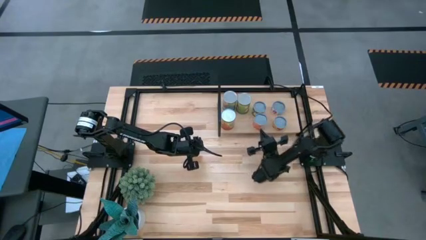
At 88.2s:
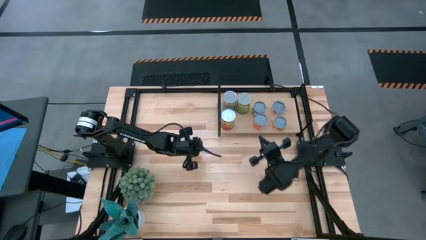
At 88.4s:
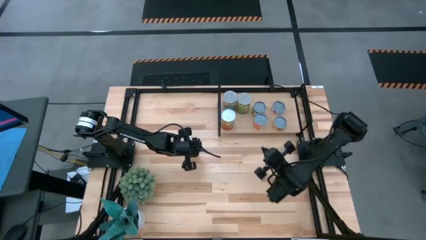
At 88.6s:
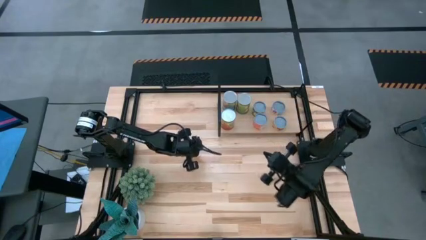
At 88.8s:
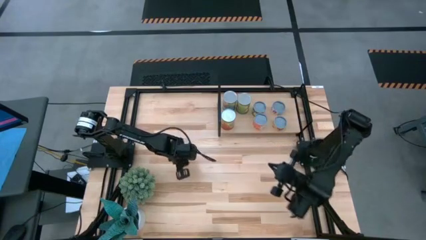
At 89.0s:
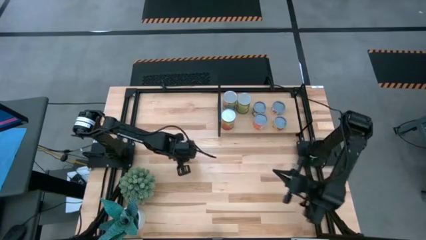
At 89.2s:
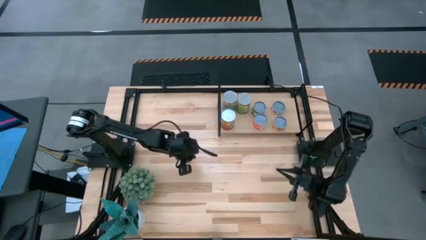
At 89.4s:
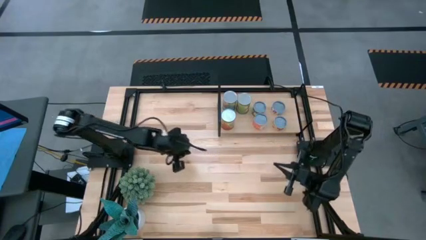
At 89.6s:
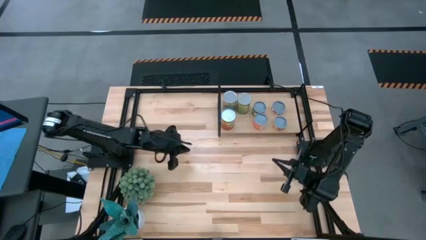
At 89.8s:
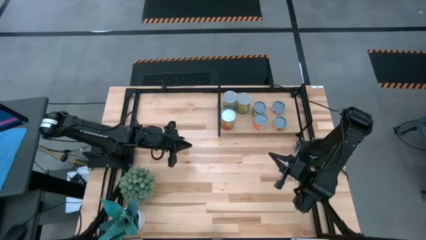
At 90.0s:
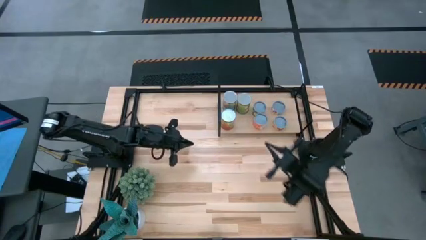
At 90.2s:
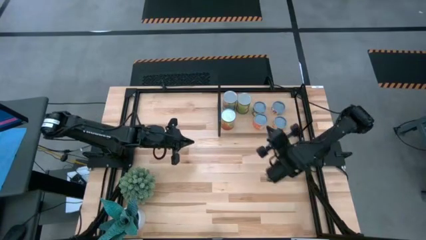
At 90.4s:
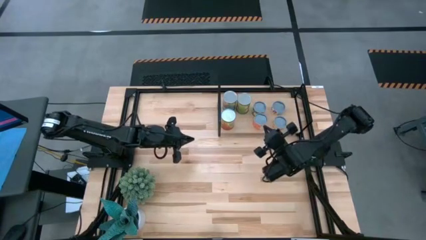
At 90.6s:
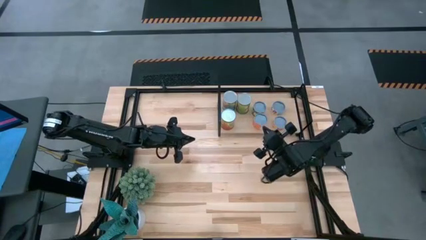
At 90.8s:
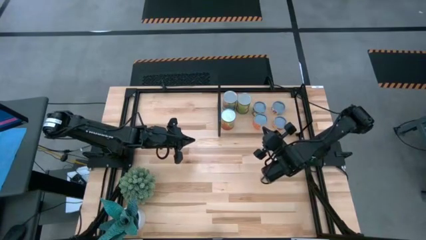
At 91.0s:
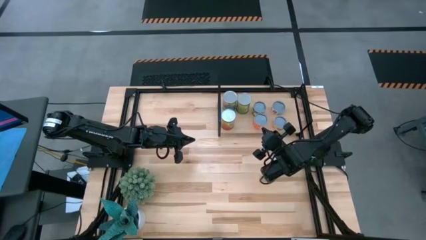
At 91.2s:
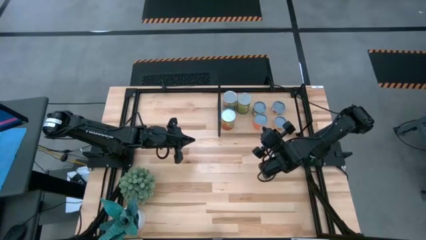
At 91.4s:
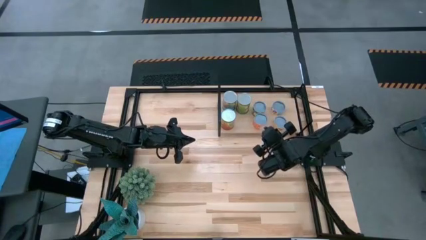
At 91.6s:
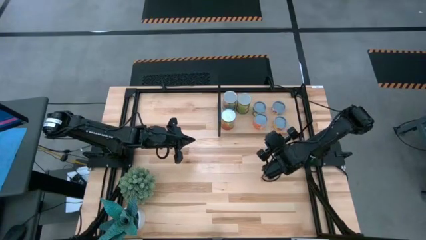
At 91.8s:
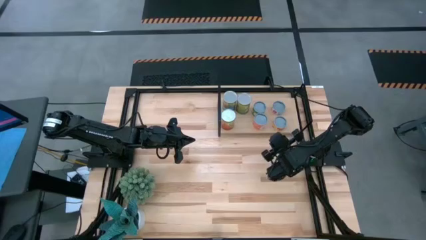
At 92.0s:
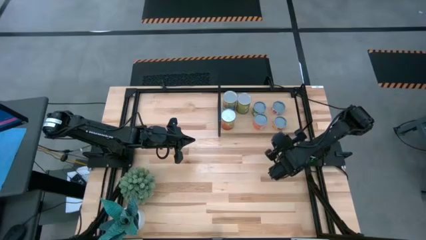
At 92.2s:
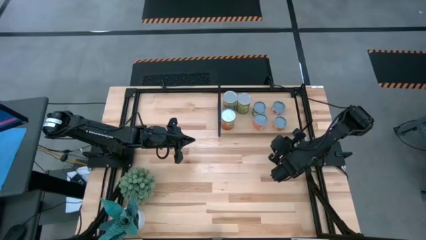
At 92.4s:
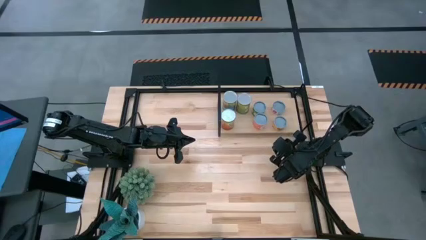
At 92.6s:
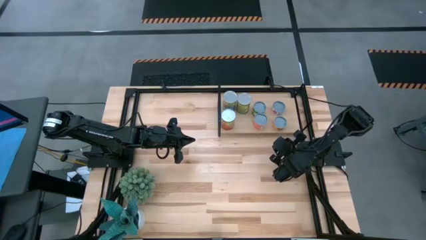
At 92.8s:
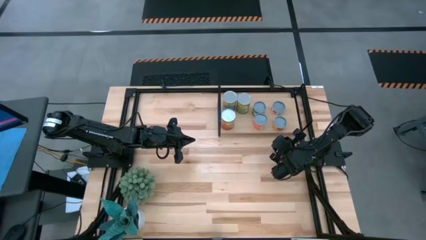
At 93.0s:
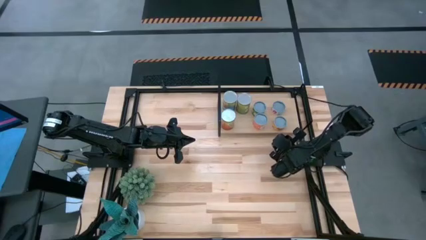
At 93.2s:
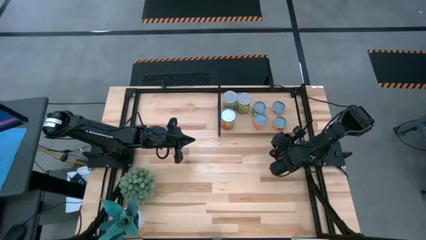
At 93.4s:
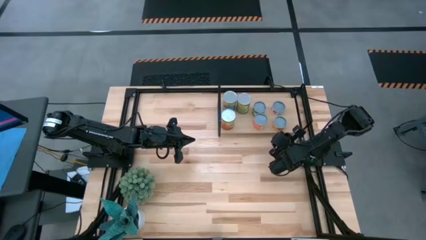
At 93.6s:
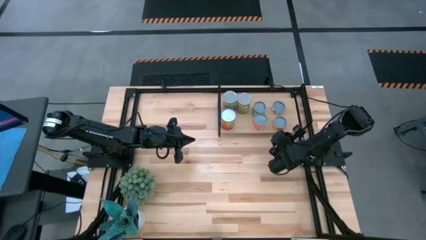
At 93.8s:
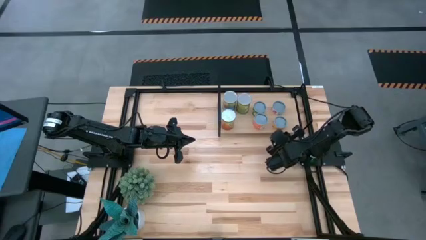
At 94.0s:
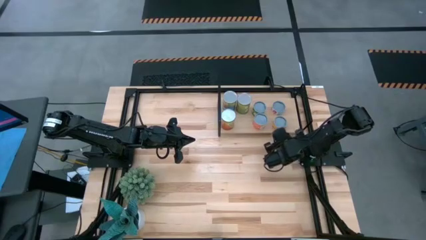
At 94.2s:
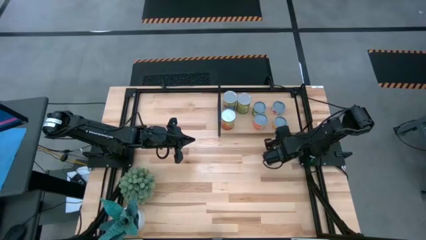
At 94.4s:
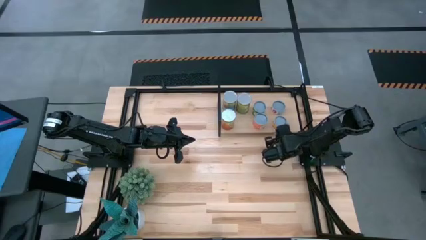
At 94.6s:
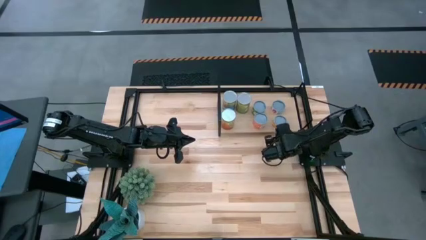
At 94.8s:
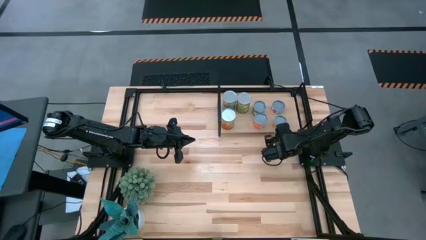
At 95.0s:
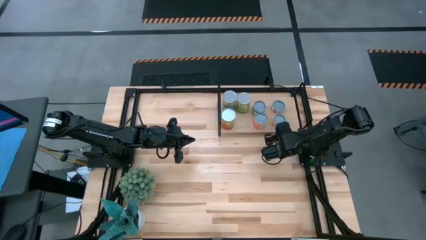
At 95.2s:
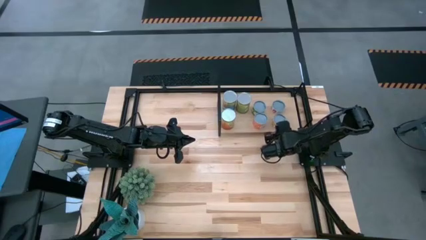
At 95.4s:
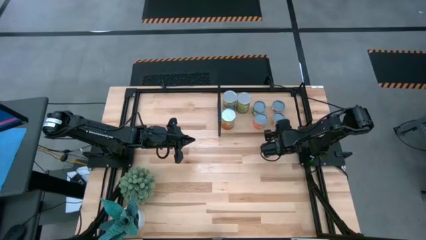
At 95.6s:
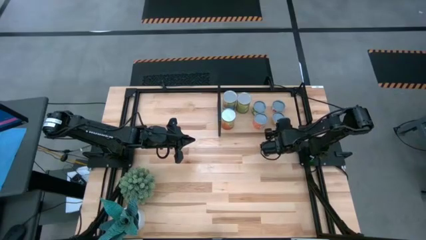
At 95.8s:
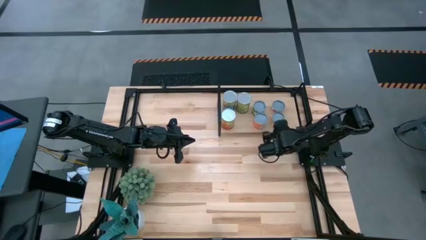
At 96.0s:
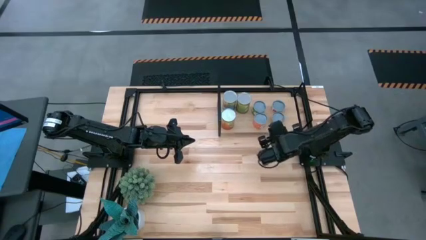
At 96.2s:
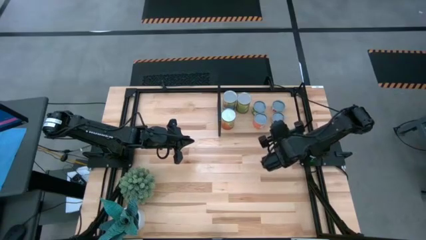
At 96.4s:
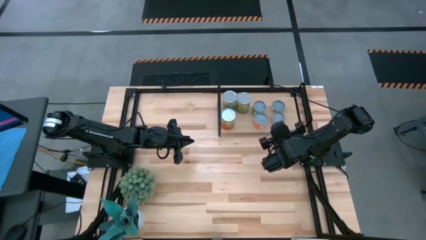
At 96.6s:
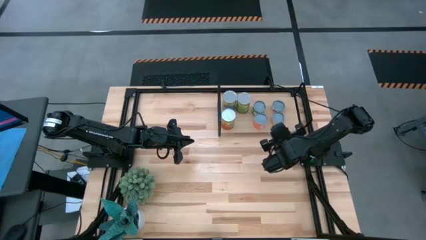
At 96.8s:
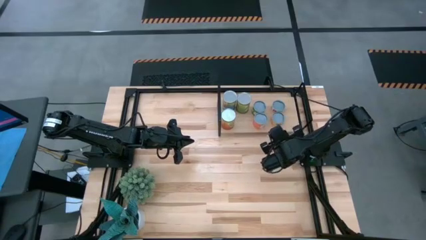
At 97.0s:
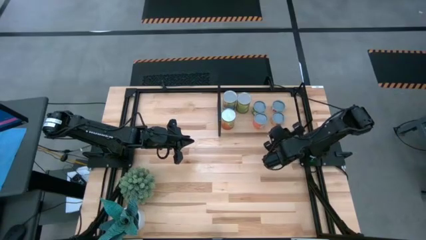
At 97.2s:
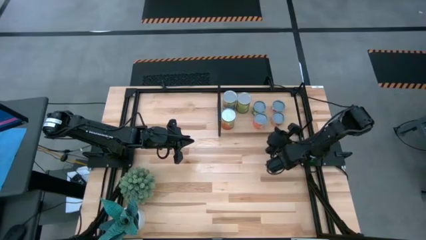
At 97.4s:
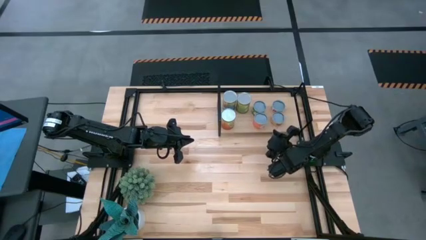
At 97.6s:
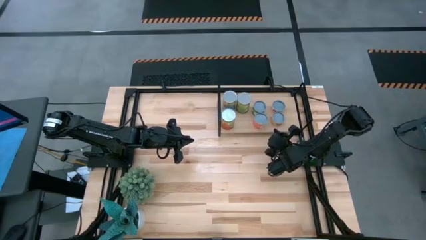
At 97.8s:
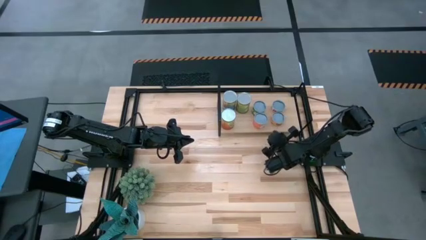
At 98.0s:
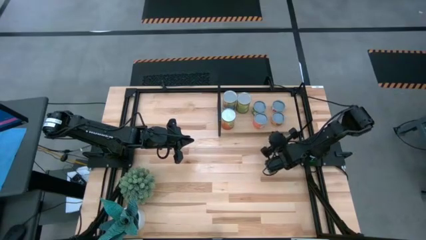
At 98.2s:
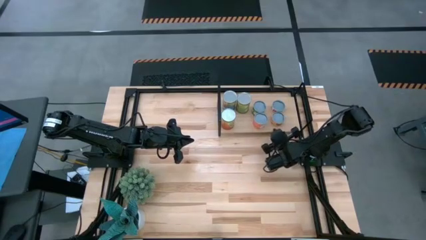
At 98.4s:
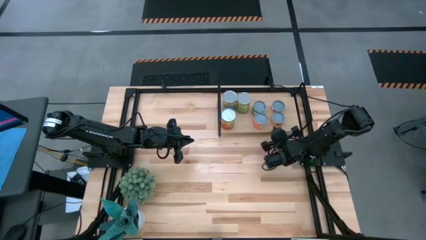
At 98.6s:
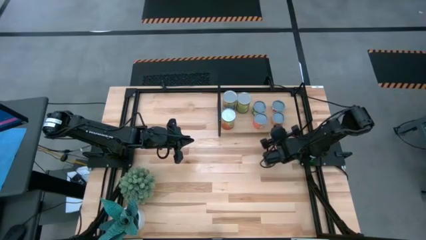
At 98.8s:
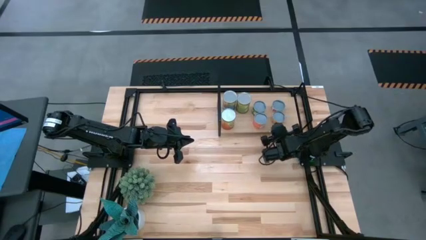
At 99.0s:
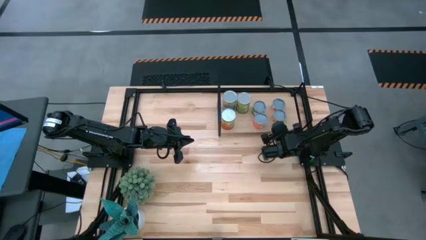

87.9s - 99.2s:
Task: Pick and place cans onto a shelf
Adjust the canned pineapple on the shelf

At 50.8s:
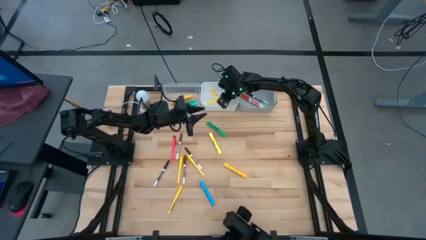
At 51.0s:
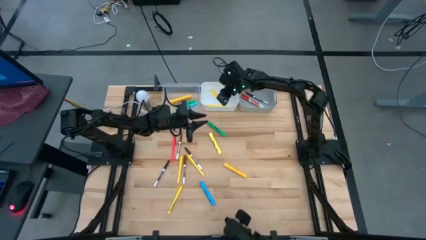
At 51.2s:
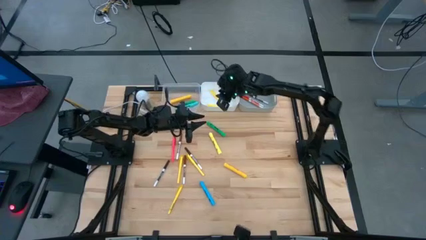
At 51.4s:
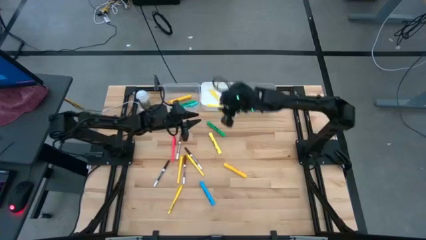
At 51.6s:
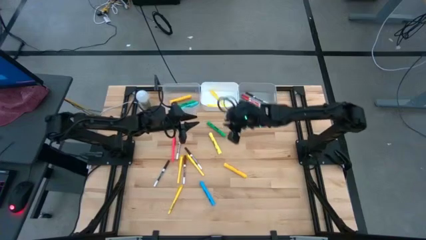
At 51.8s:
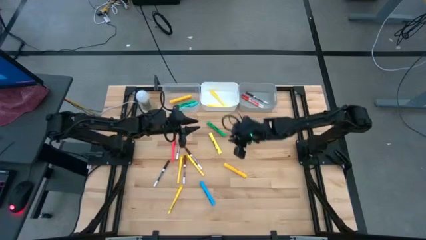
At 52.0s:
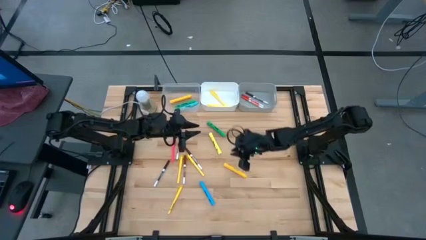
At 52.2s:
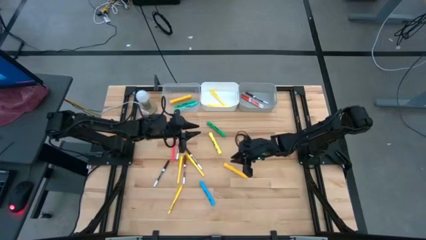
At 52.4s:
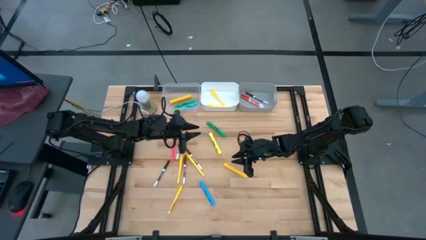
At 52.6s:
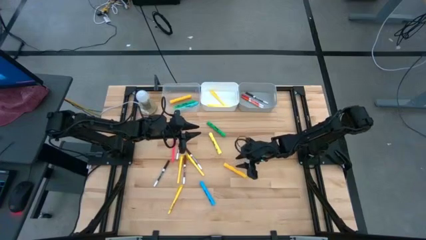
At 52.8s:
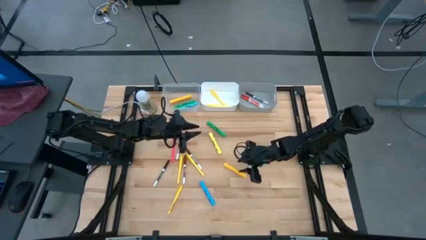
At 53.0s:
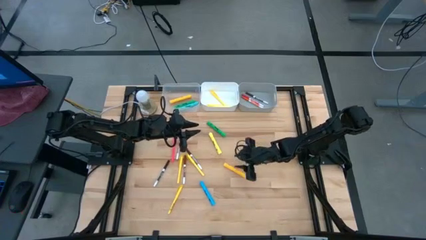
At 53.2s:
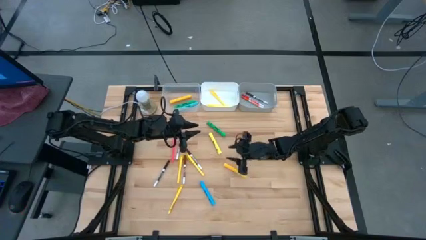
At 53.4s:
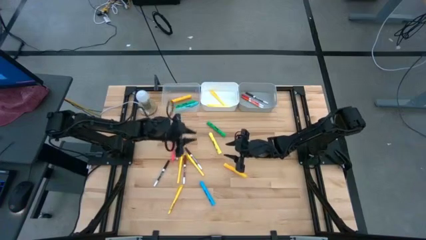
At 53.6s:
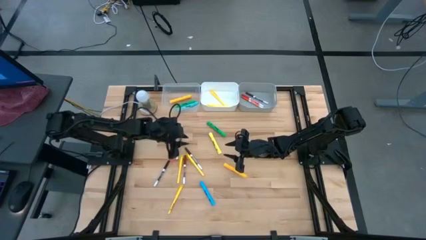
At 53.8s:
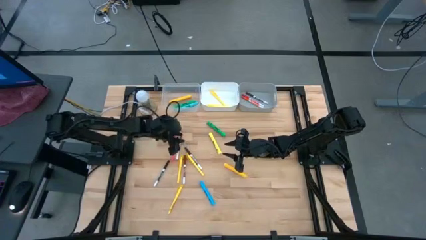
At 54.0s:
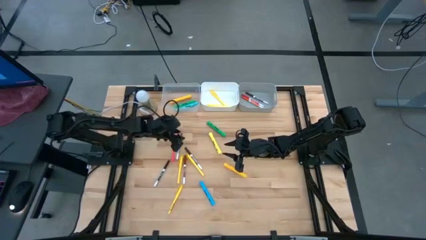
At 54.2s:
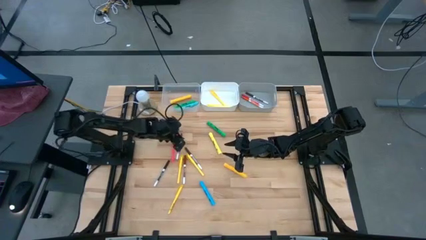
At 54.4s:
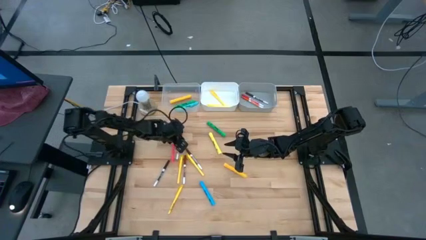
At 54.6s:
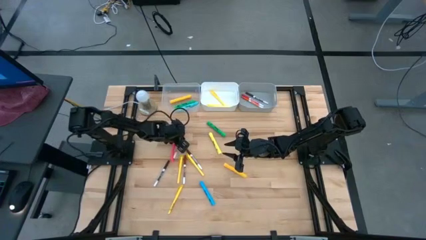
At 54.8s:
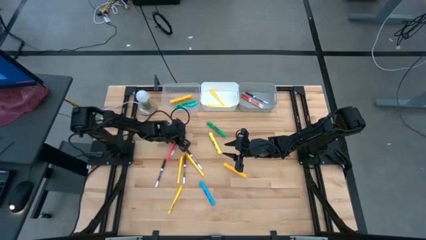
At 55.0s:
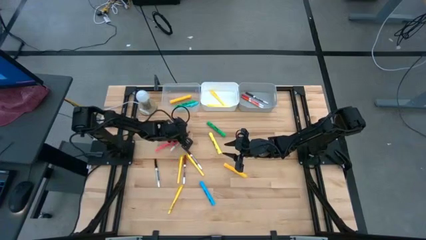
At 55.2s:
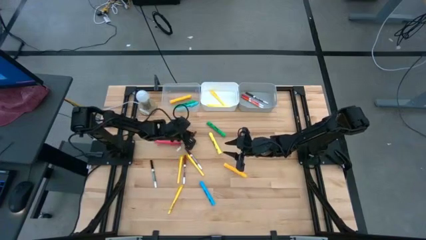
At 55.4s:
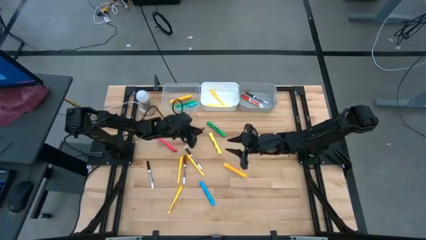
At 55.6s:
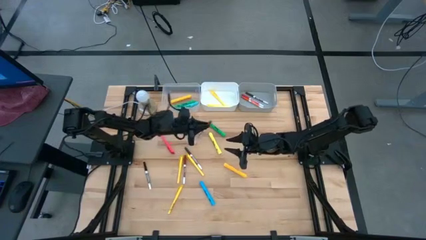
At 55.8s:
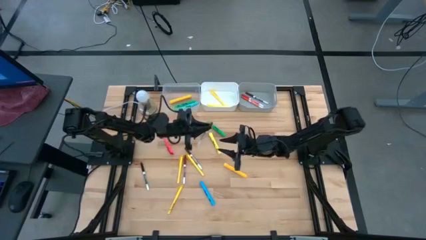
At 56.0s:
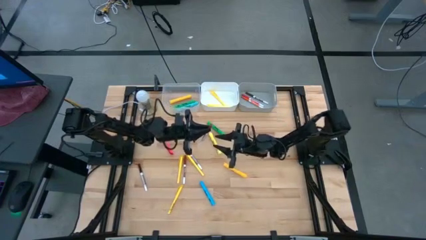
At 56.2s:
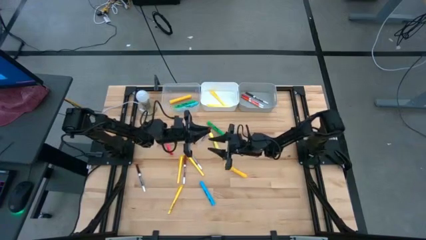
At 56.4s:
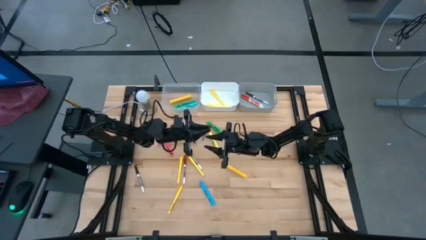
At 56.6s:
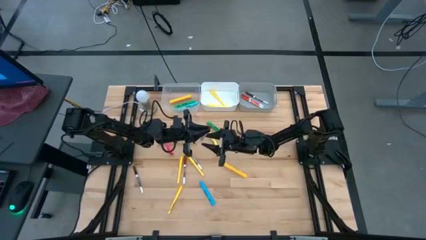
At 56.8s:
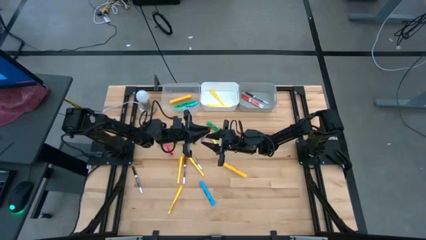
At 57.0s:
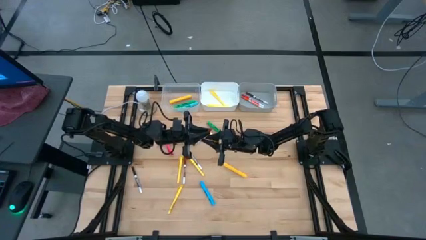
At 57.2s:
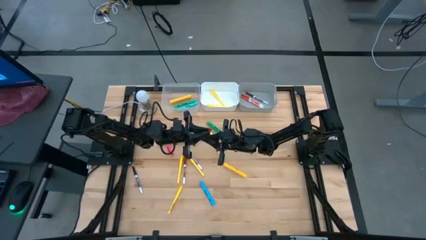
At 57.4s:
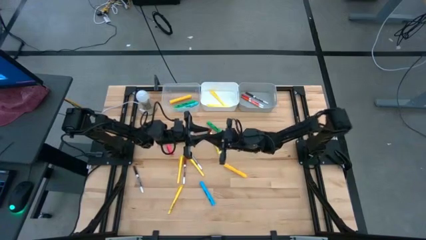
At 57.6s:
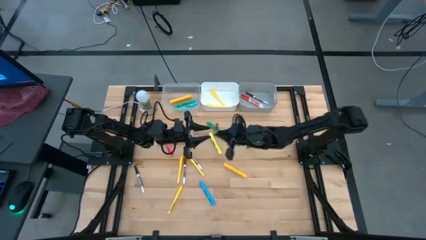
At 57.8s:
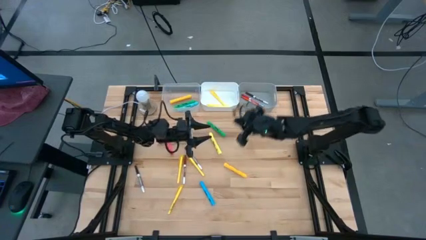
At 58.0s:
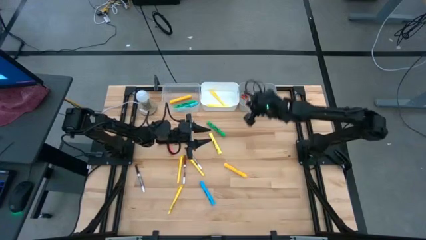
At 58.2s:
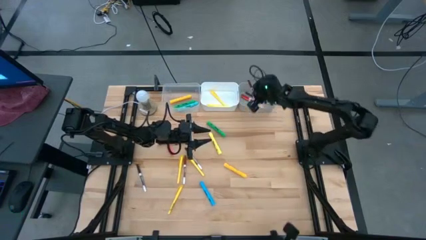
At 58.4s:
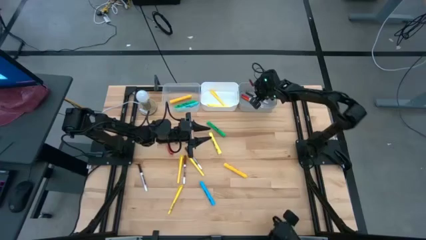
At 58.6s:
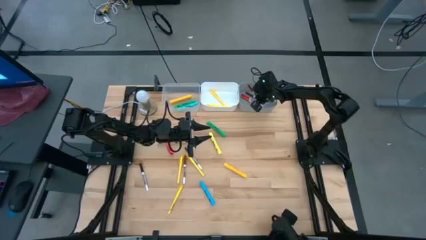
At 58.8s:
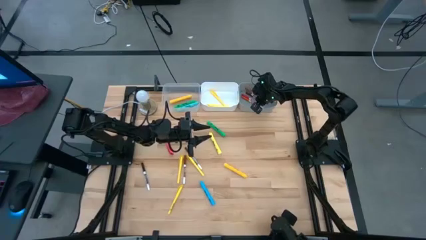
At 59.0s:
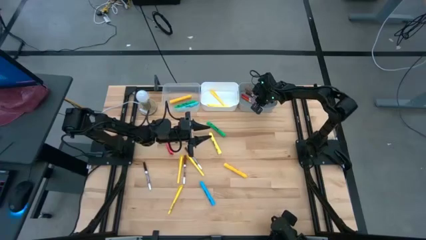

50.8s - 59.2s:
Task: Pick & Place Markers
Put the light brown marker pen into the gray bin
